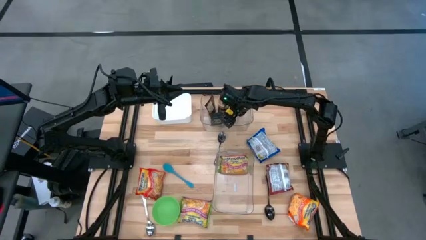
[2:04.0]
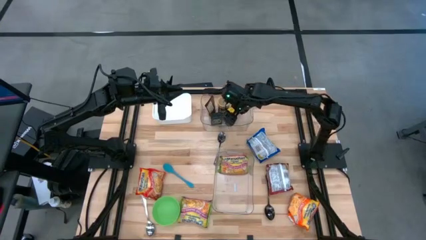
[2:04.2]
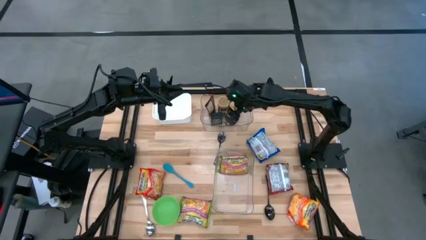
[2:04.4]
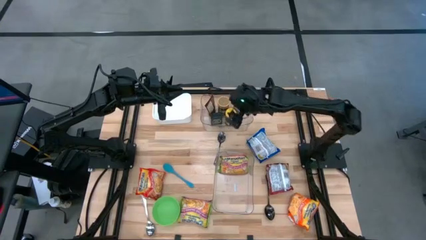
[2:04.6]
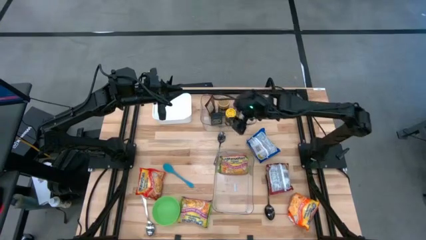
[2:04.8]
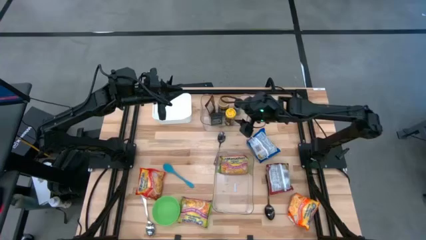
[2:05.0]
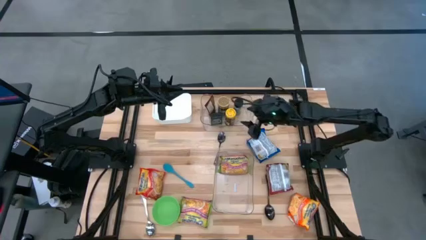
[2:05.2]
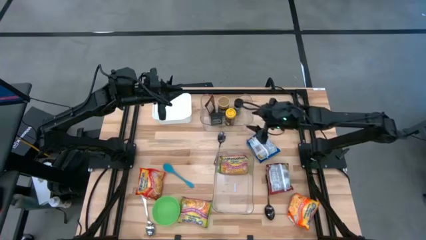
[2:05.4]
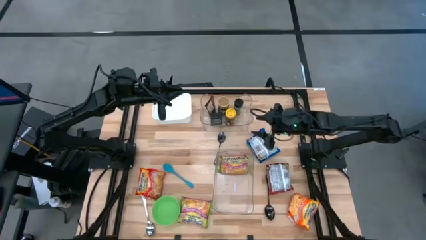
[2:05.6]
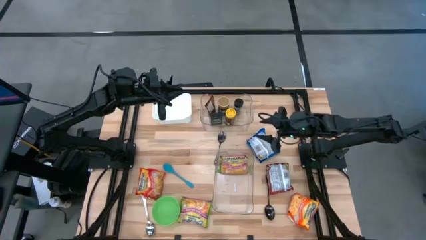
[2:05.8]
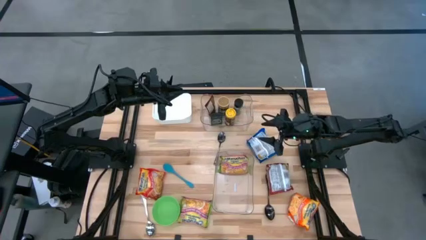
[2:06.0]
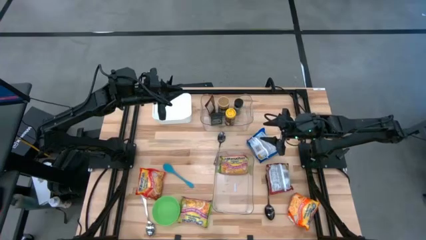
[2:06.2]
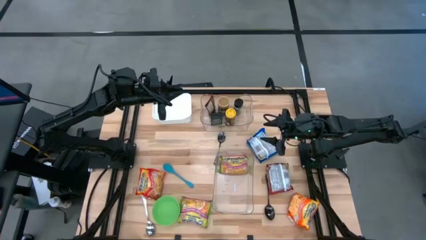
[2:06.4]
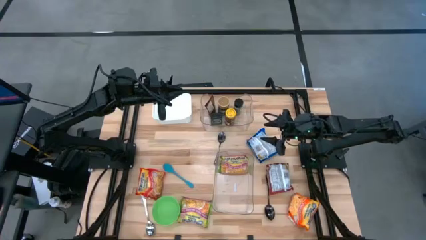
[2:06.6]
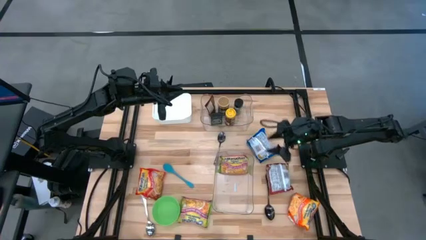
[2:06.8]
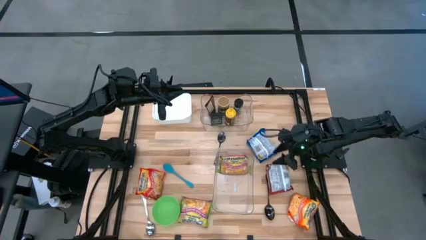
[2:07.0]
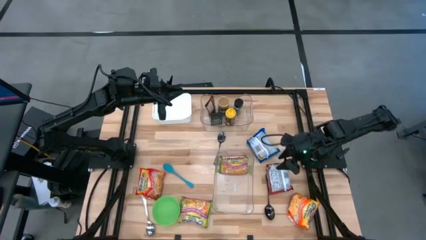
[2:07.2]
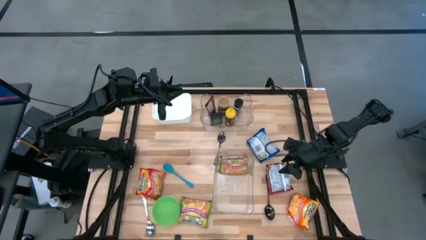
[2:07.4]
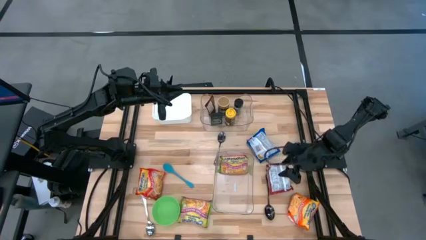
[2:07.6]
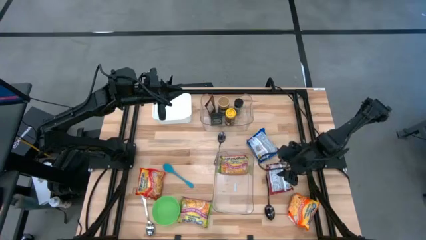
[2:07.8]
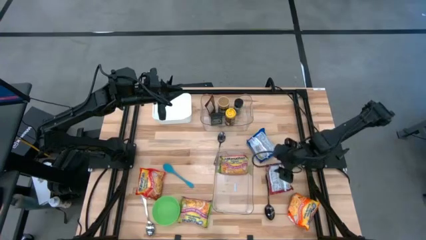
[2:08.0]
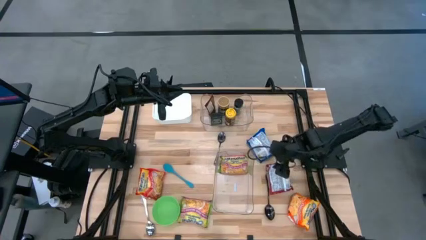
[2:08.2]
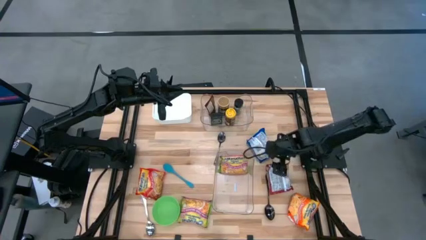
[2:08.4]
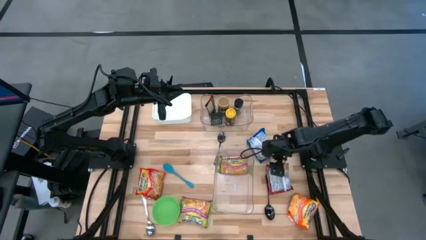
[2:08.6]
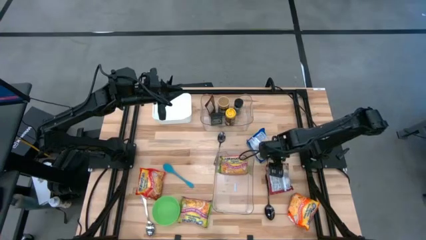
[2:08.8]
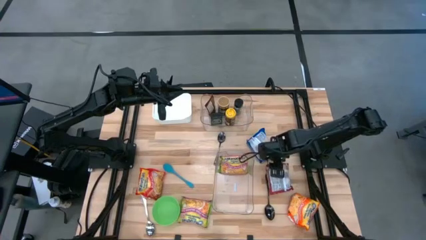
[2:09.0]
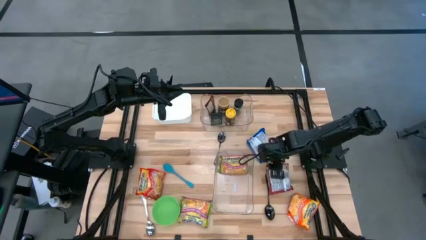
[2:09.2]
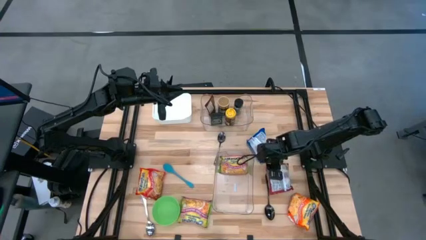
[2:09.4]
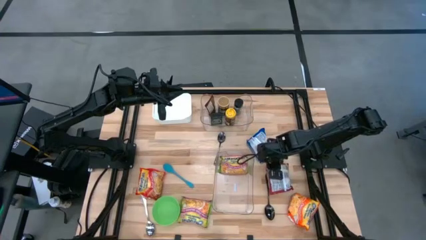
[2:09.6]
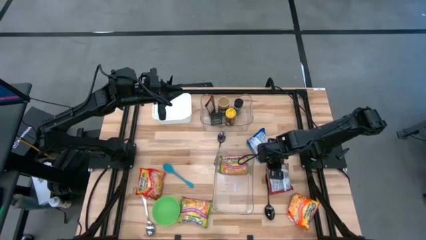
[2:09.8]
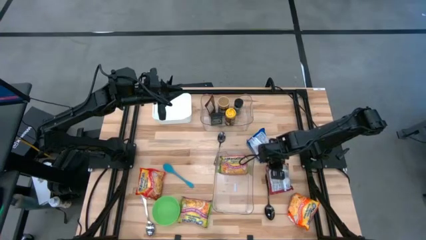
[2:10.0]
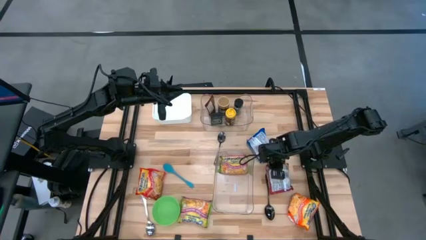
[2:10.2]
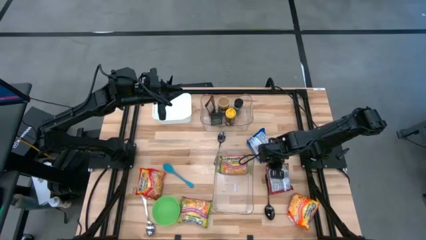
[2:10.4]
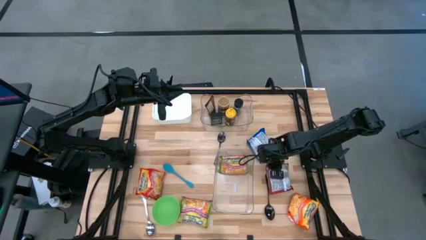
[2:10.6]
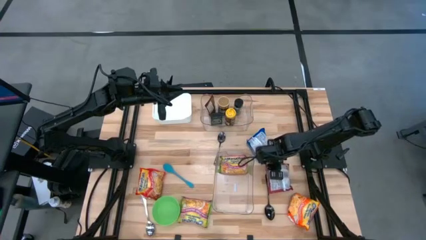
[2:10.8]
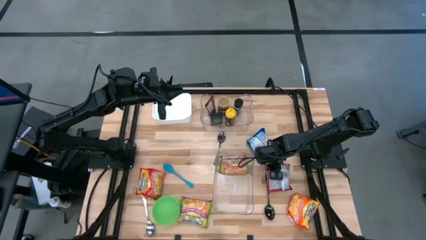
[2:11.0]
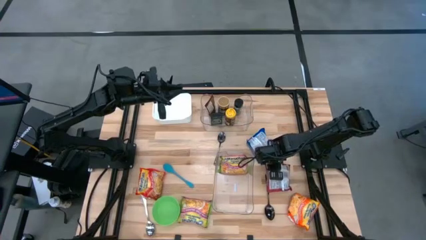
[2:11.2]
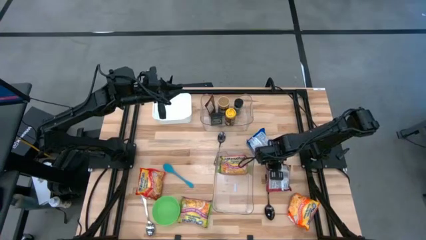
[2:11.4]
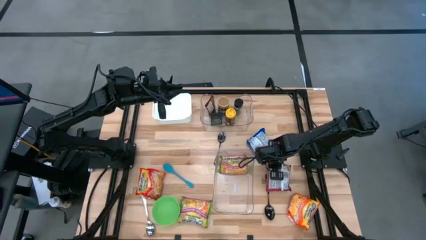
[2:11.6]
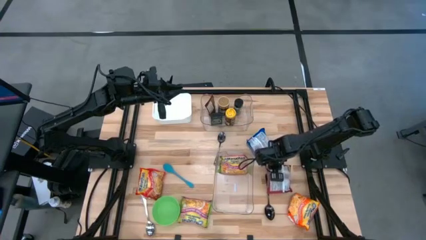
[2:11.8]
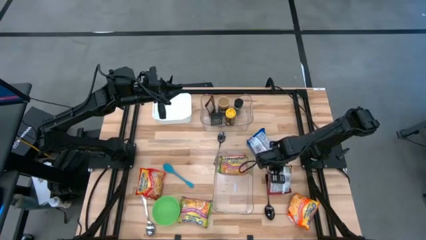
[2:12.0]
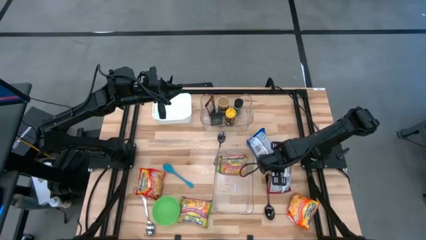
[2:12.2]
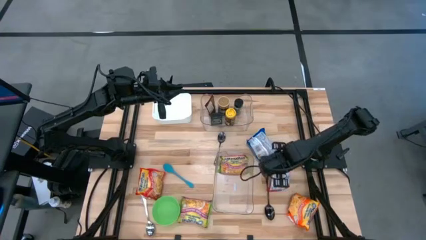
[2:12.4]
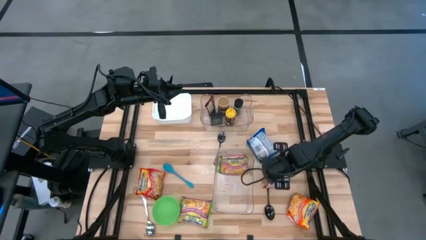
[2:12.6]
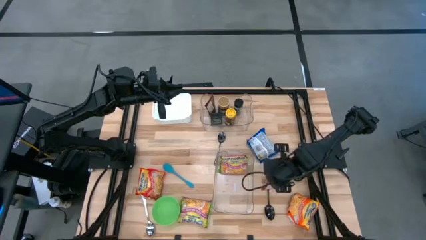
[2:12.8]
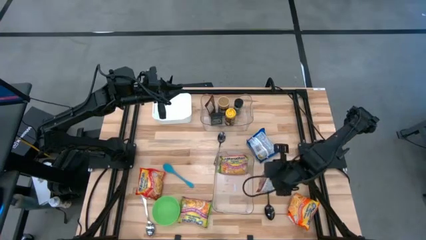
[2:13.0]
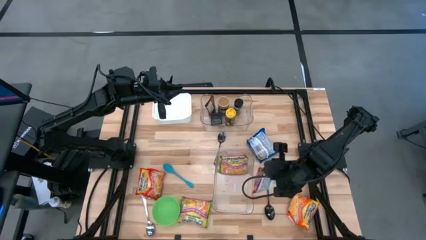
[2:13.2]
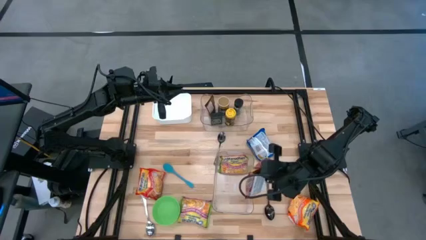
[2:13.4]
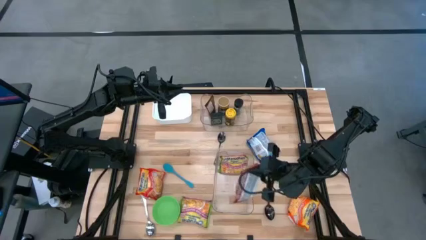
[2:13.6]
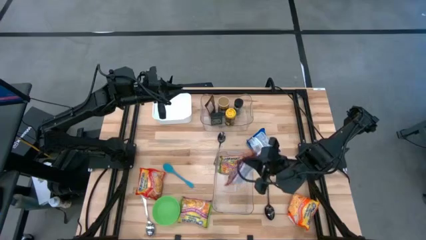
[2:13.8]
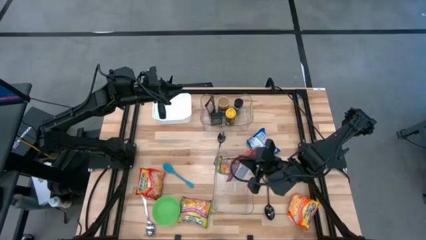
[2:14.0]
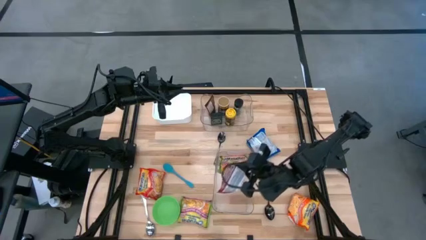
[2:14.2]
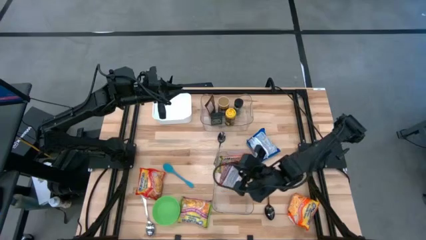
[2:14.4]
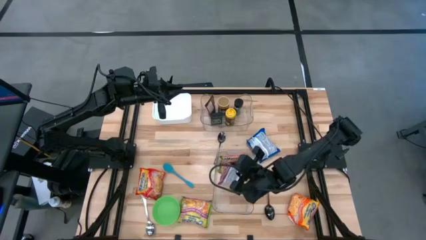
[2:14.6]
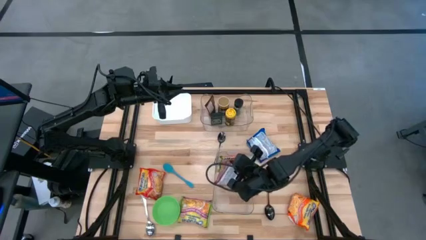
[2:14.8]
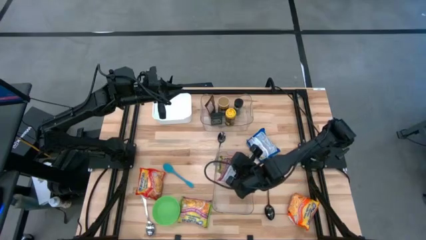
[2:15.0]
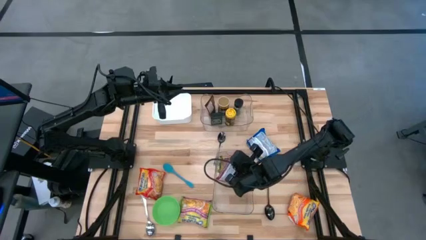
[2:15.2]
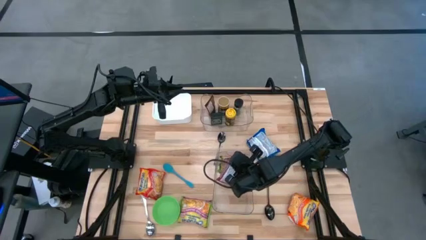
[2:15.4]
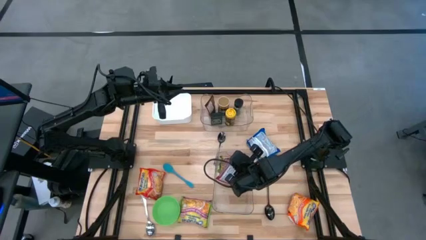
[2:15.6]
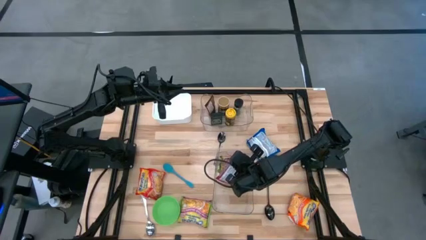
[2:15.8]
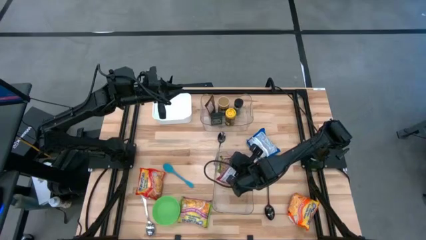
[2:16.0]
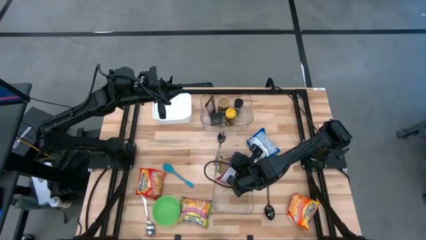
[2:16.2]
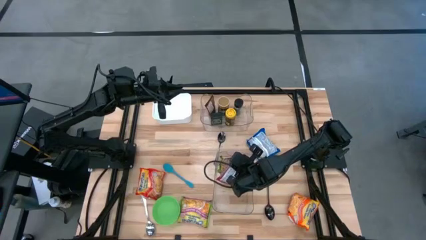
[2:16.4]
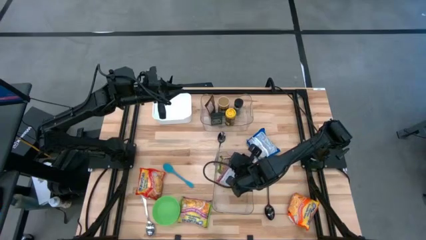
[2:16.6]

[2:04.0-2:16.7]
Task: Pick & Place Food Item
Put the red noodle pack into the bottom transparent bin
